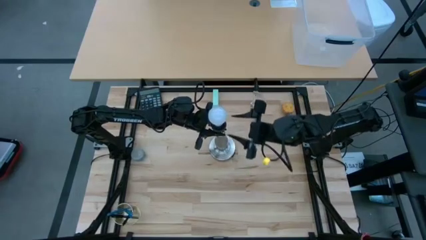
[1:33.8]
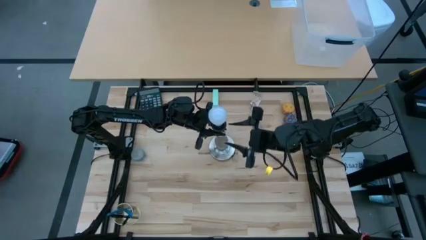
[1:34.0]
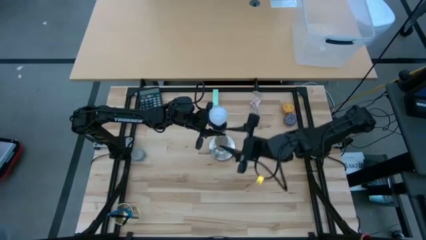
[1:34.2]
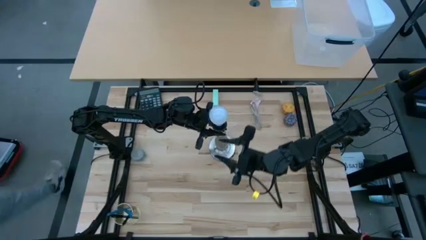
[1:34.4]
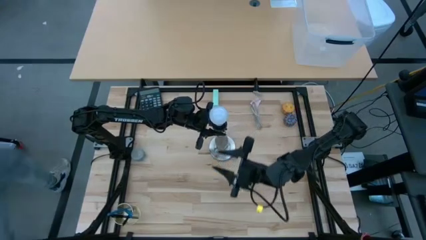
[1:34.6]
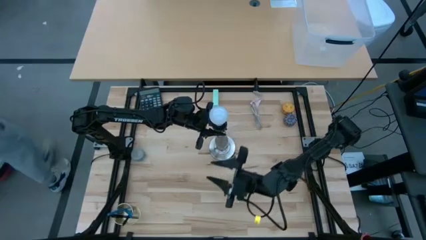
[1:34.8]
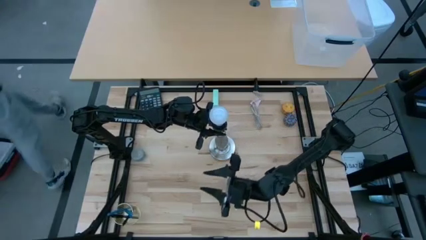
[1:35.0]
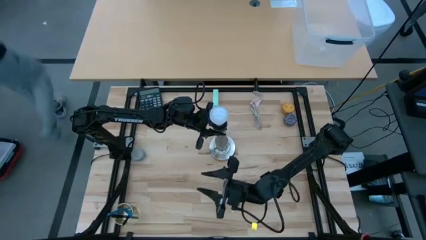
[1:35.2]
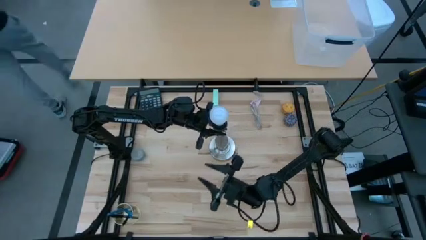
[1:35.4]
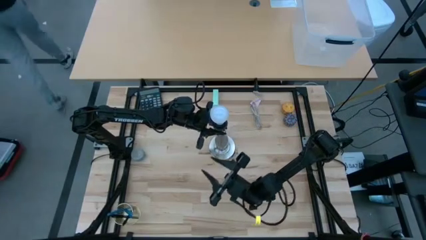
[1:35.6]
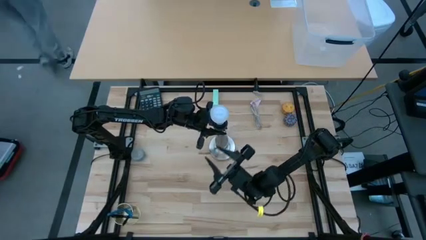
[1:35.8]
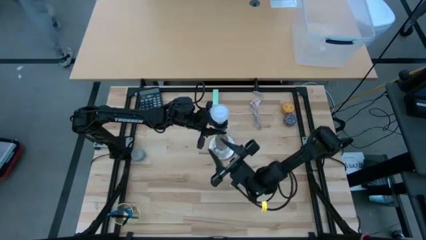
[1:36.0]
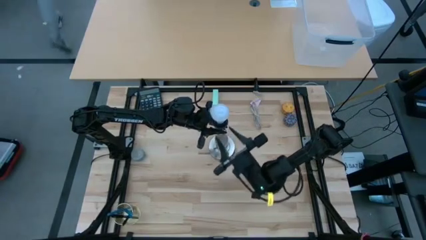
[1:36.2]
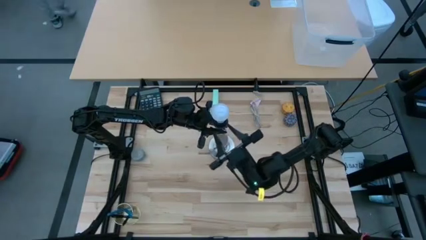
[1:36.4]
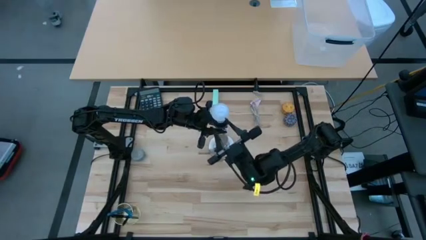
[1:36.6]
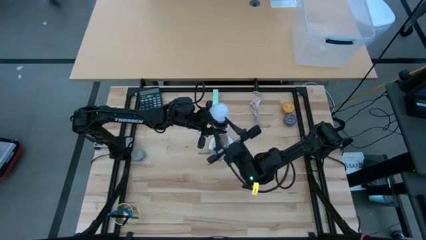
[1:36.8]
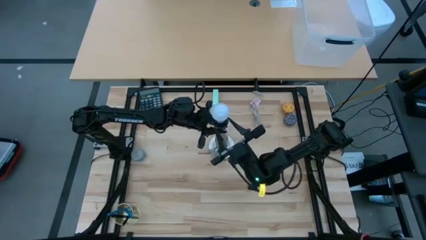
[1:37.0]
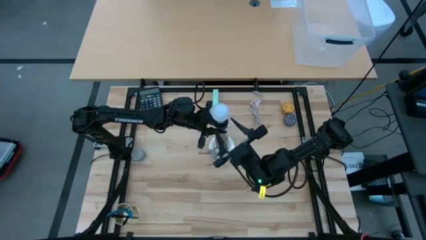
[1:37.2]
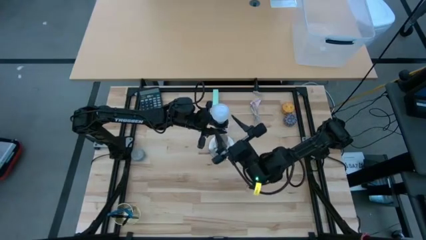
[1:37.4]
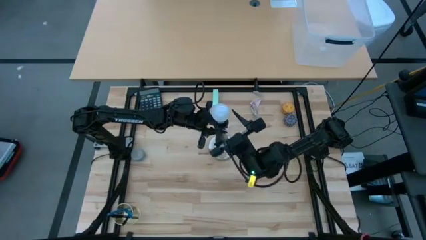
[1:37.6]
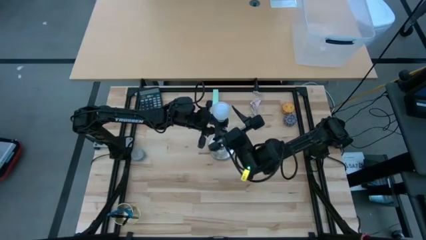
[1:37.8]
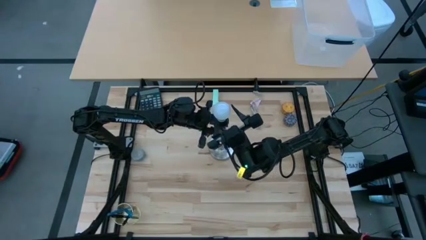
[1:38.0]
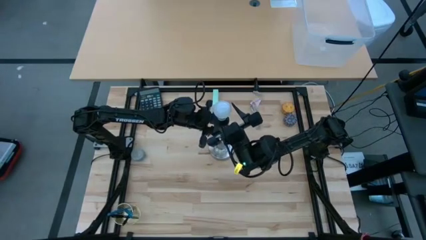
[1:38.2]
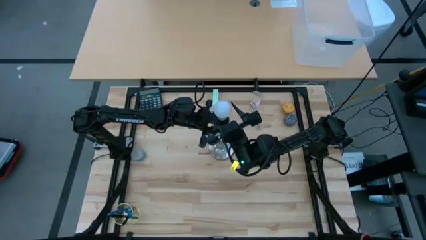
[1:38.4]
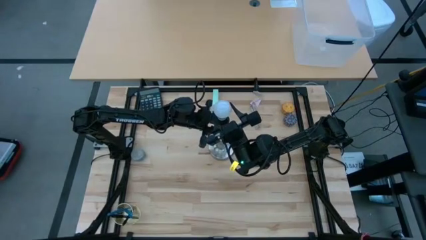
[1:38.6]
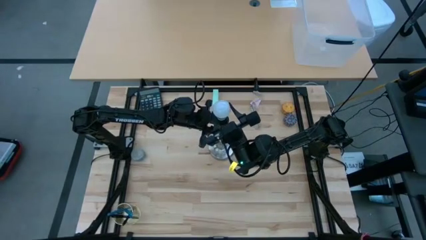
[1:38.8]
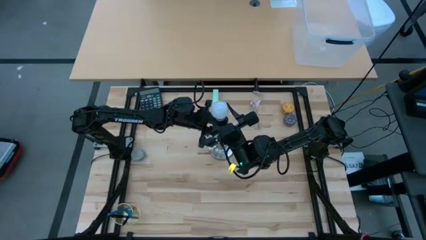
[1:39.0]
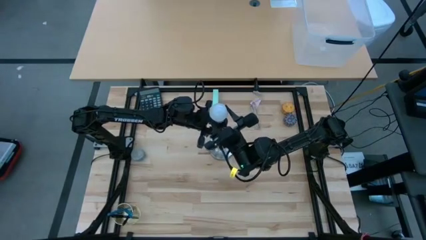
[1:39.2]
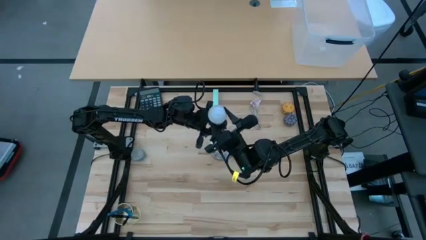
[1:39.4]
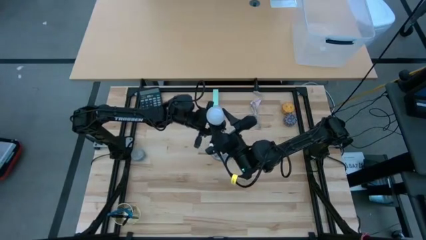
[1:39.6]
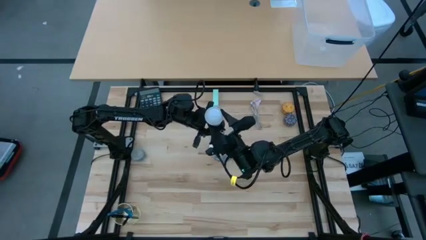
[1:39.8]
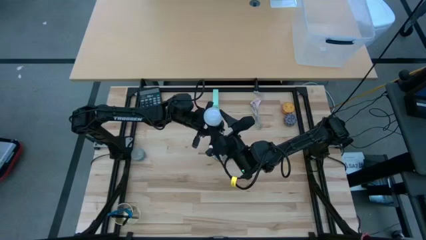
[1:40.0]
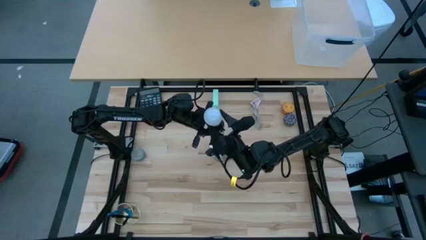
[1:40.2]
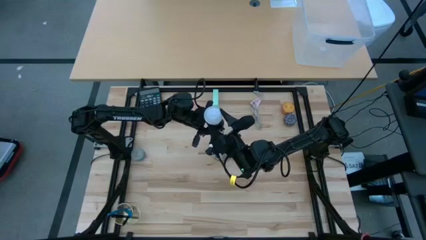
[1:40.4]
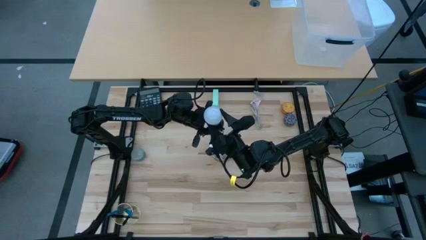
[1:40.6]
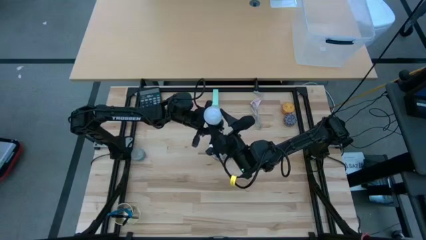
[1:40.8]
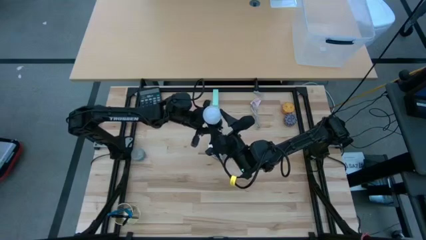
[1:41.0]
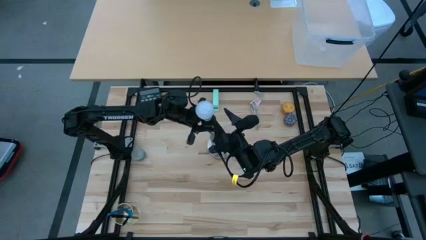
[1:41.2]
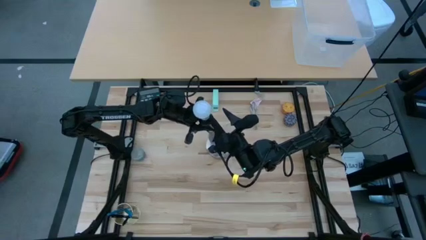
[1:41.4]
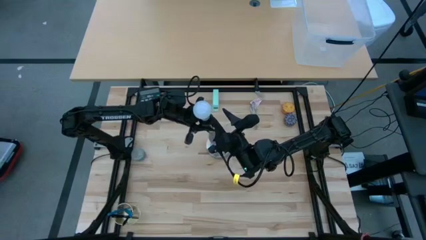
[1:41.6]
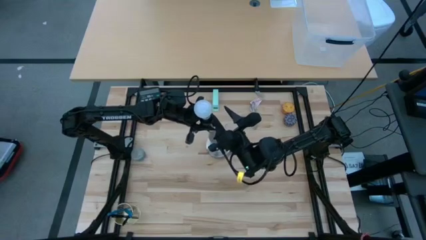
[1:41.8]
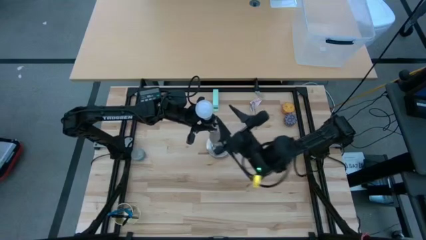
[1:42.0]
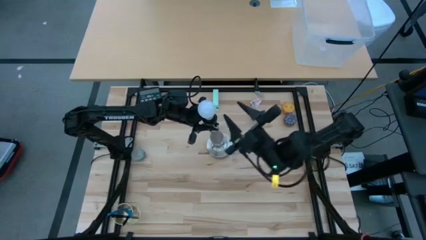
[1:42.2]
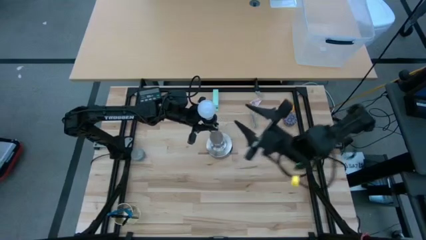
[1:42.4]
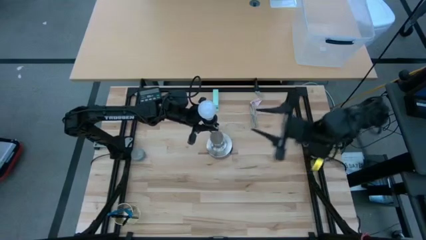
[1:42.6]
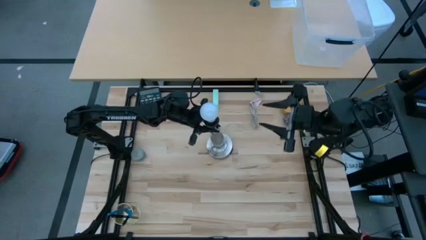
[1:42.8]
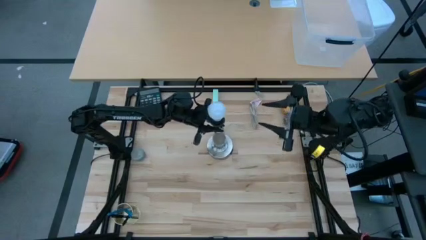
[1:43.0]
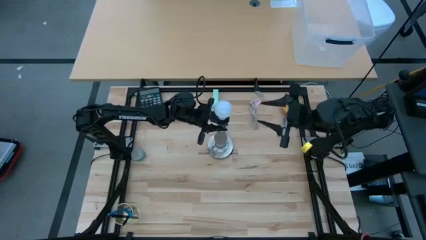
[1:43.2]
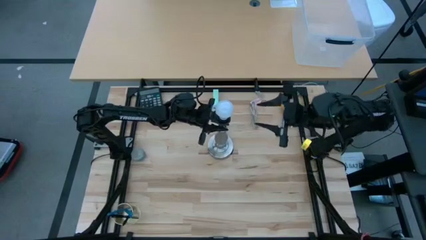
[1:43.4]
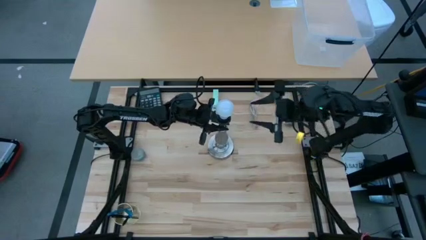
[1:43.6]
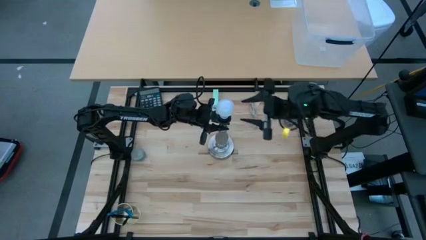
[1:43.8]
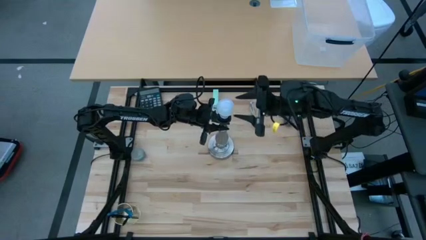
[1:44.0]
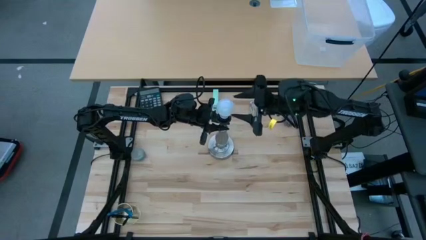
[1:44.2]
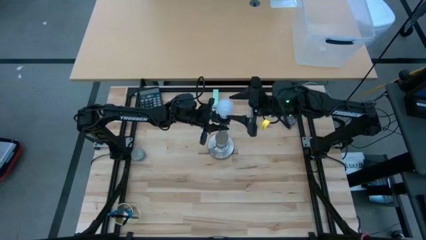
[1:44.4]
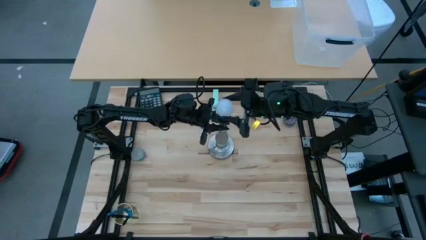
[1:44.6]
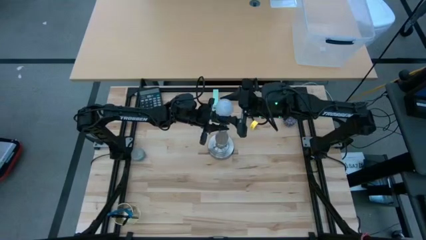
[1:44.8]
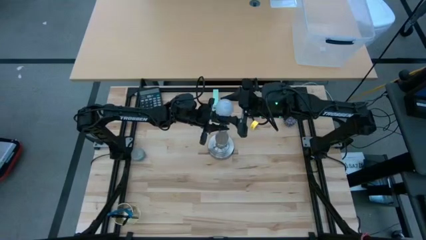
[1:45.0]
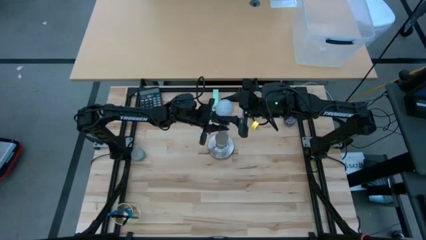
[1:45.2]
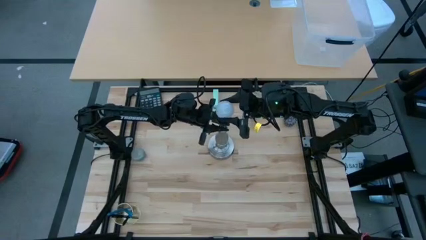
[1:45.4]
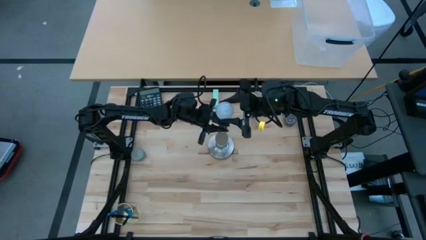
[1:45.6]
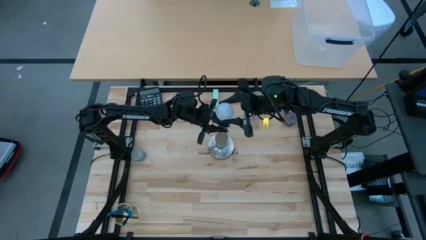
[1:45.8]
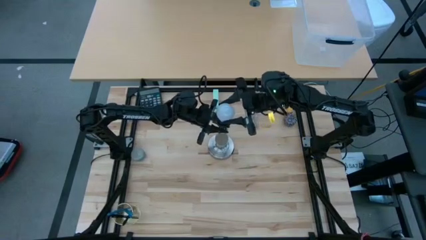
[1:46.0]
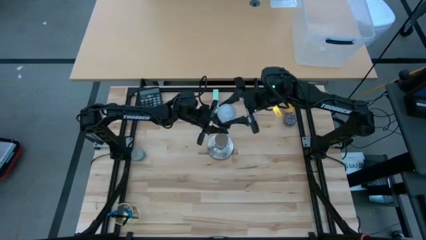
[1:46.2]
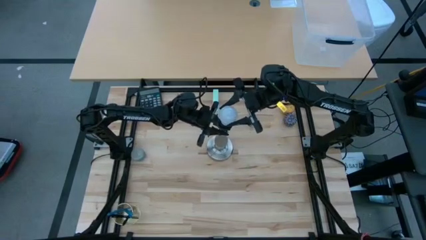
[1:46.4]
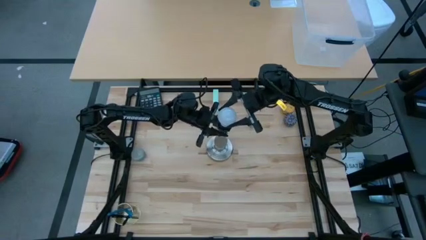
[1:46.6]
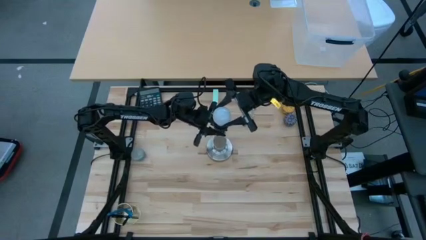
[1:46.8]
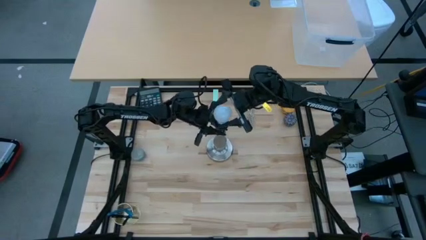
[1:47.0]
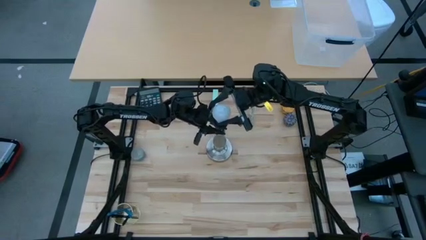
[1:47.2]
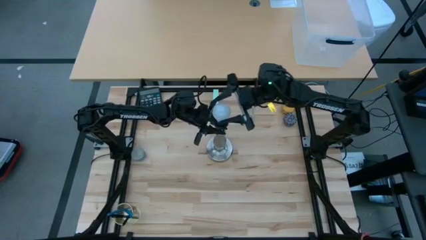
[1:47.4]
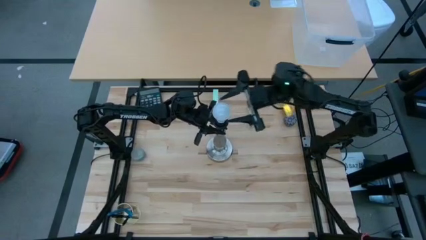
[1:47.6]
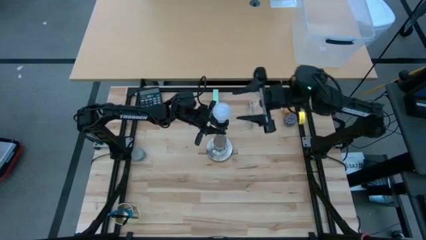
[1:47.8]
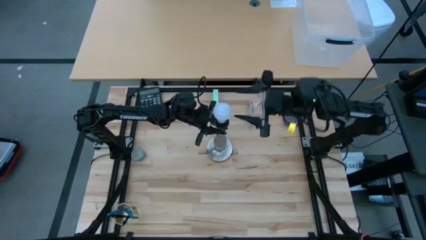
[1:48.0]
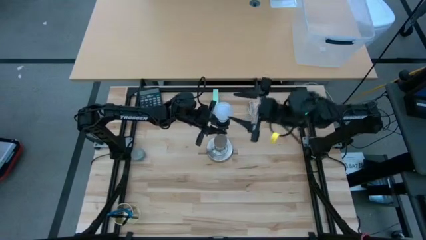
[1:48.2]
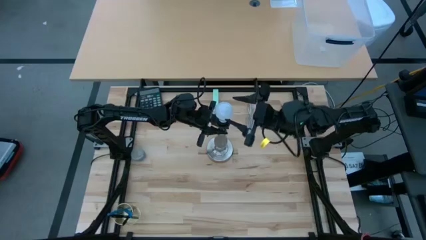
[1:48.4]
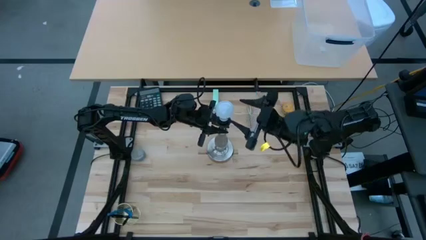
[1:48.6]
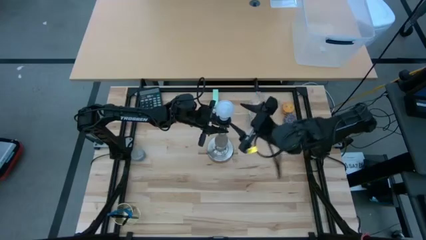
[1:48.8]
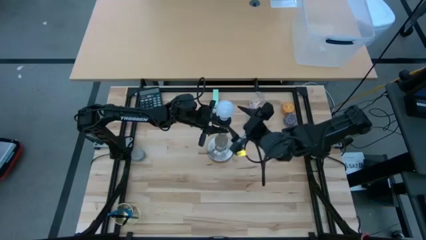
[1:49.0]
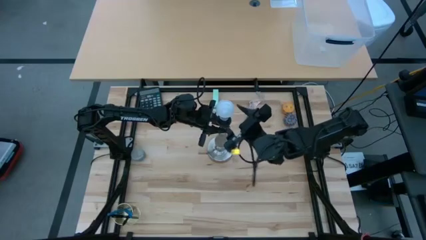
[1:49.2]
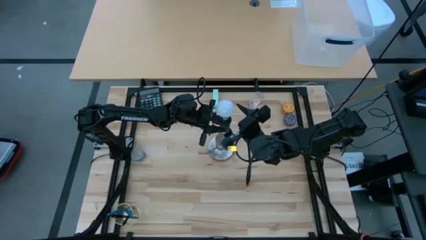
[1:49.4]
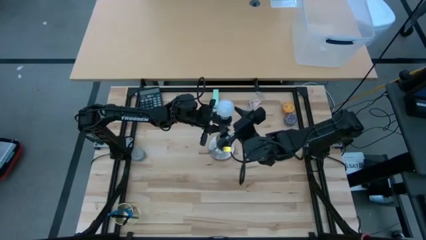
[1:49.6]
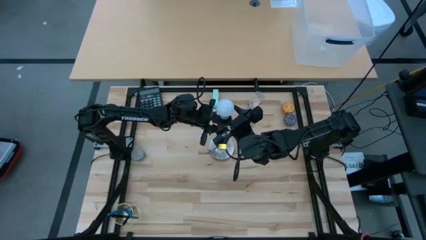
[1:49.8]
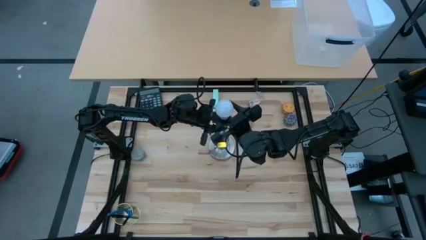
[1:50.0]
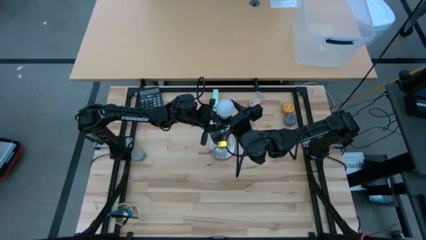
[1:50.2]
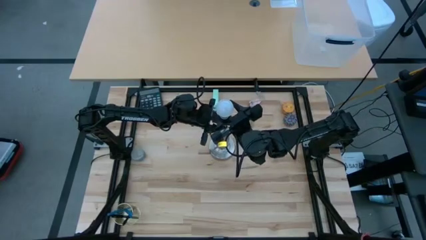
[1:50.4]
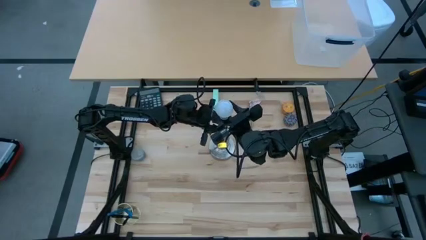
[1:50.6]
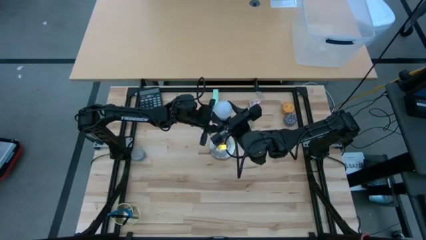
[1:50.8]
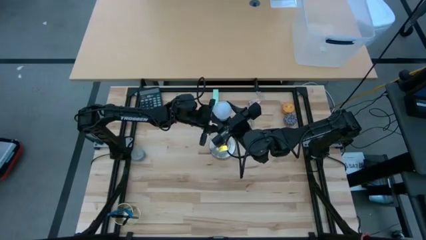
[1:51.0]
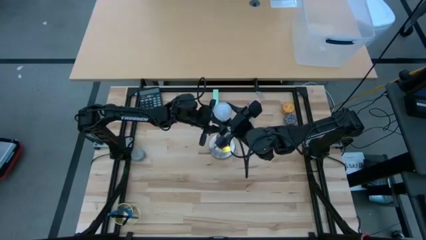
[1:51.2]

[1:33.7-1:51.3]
Task: Screw lightbulb
Remove the white lightbulb from the desk lamp
